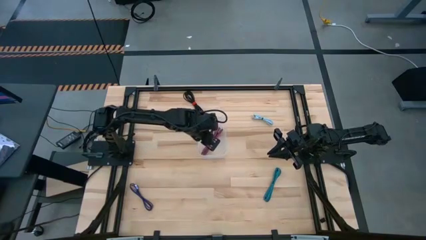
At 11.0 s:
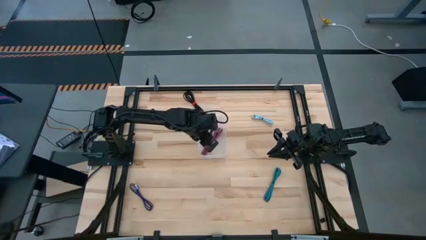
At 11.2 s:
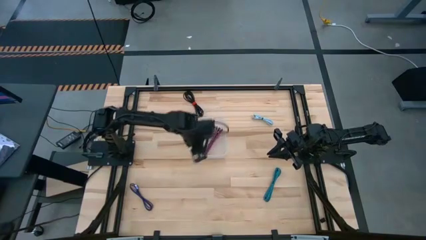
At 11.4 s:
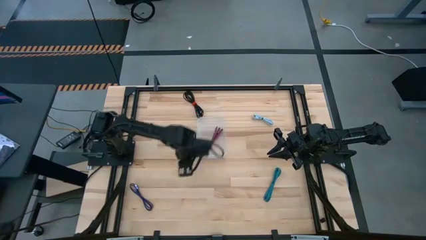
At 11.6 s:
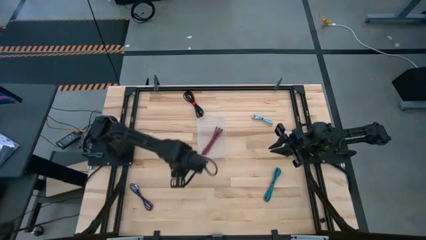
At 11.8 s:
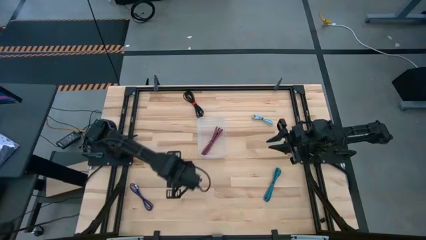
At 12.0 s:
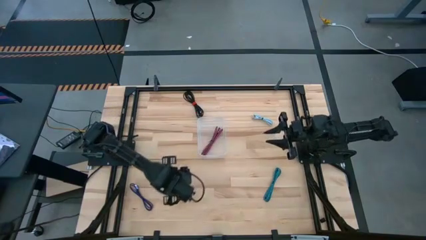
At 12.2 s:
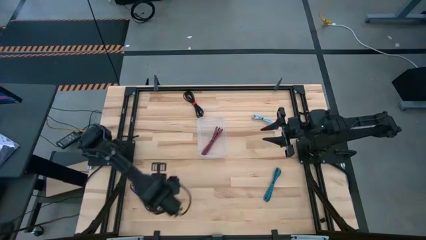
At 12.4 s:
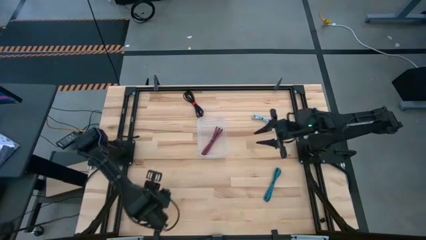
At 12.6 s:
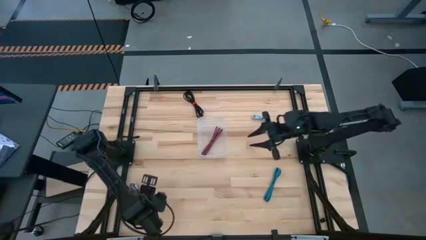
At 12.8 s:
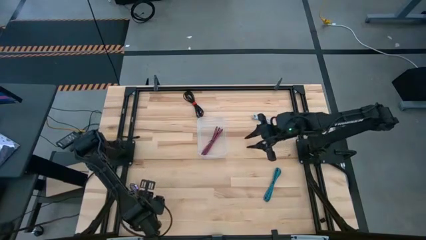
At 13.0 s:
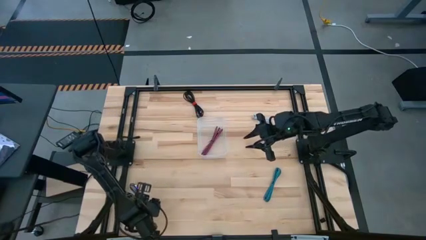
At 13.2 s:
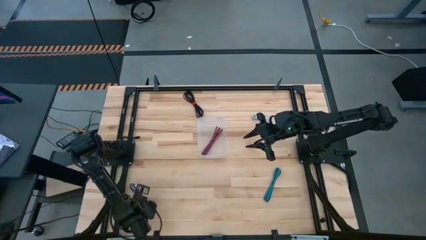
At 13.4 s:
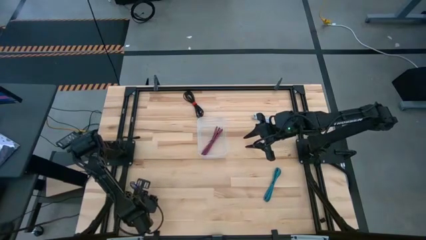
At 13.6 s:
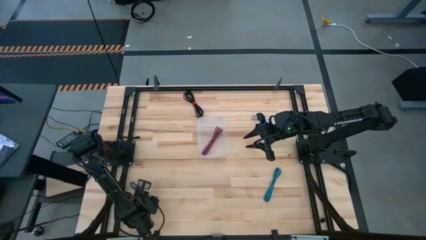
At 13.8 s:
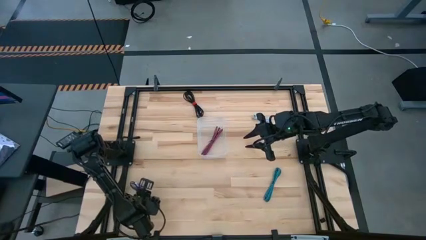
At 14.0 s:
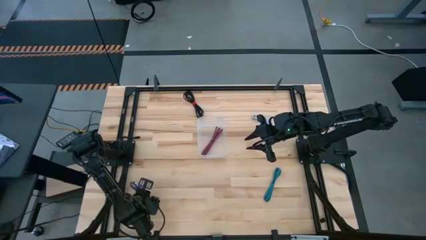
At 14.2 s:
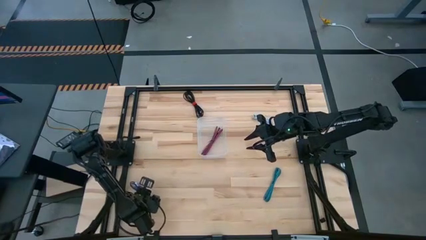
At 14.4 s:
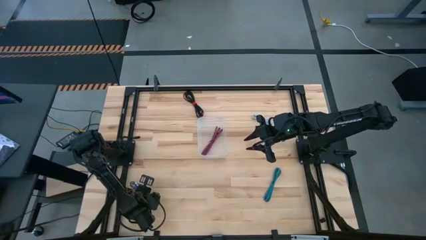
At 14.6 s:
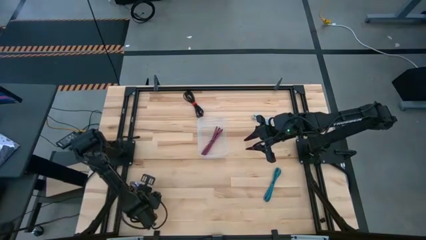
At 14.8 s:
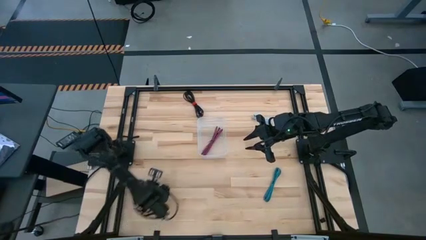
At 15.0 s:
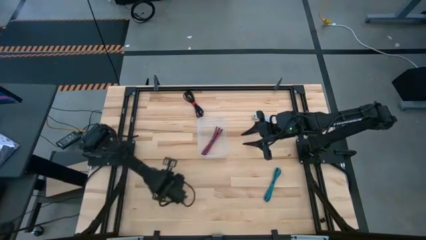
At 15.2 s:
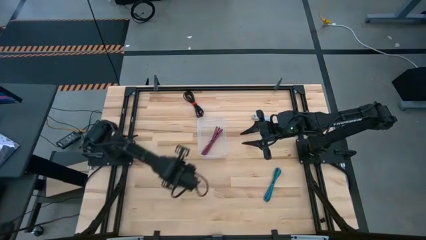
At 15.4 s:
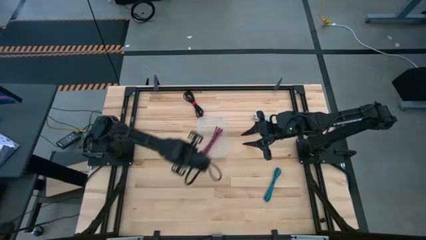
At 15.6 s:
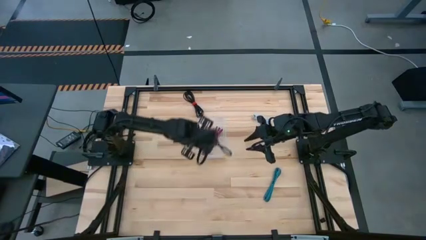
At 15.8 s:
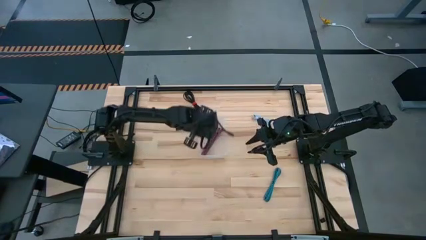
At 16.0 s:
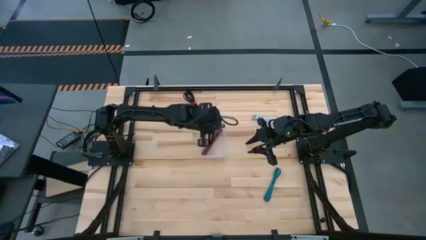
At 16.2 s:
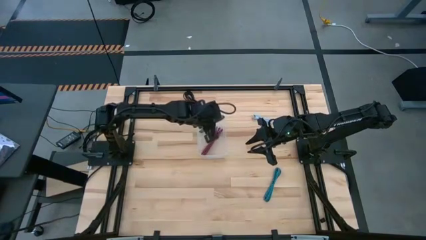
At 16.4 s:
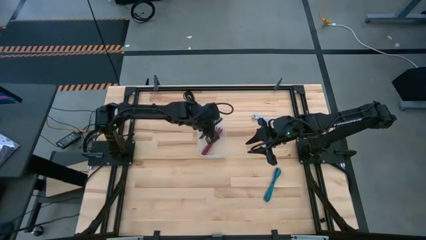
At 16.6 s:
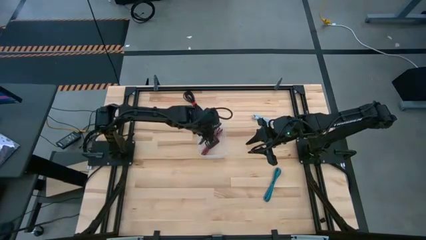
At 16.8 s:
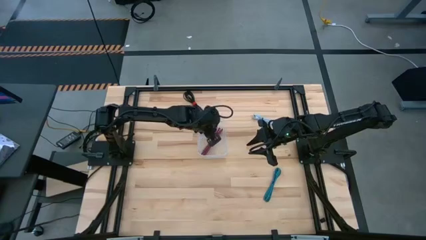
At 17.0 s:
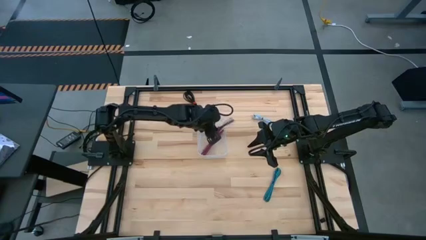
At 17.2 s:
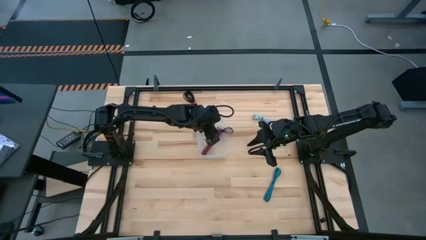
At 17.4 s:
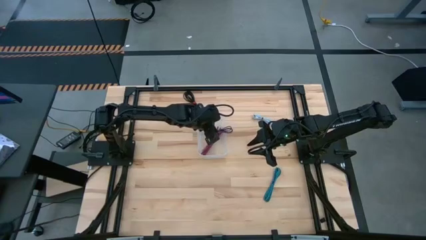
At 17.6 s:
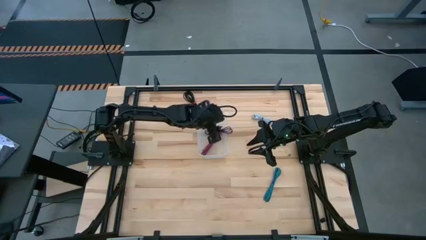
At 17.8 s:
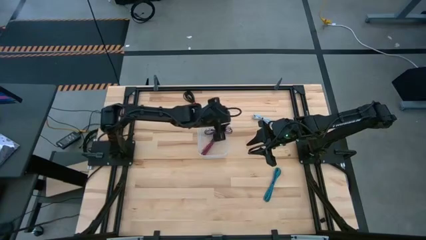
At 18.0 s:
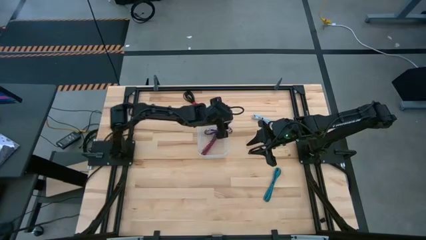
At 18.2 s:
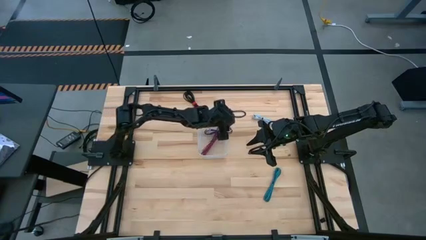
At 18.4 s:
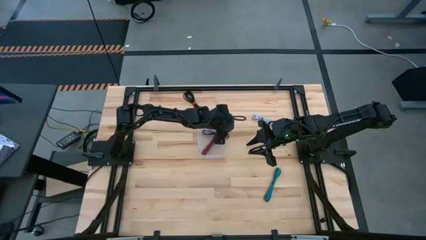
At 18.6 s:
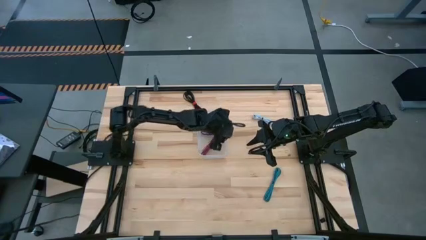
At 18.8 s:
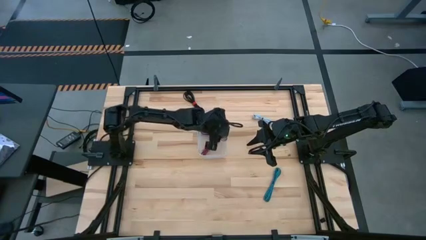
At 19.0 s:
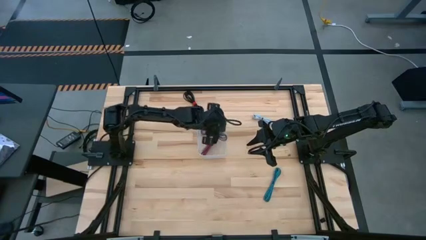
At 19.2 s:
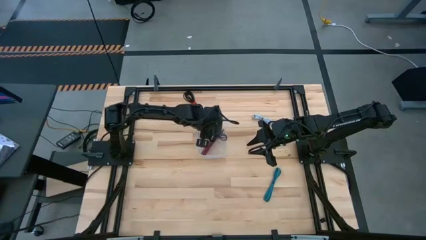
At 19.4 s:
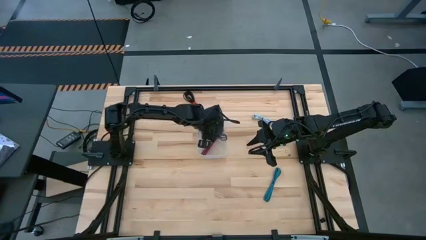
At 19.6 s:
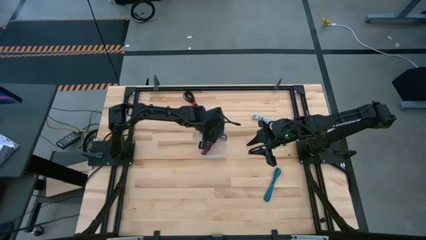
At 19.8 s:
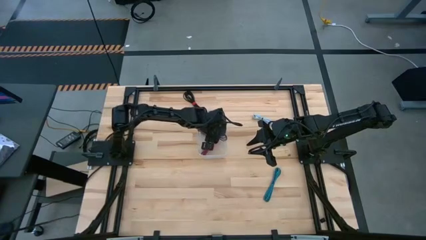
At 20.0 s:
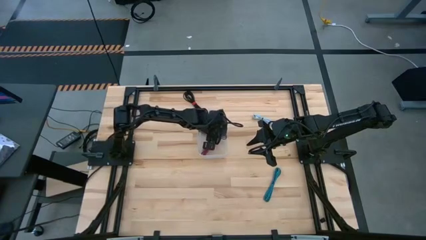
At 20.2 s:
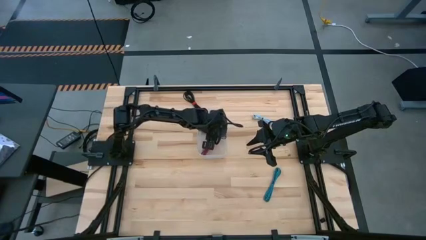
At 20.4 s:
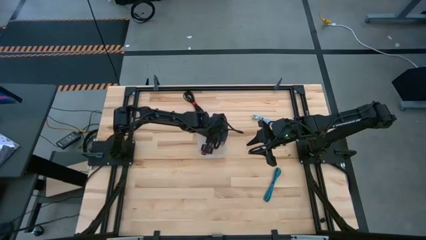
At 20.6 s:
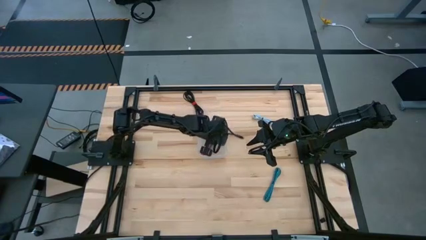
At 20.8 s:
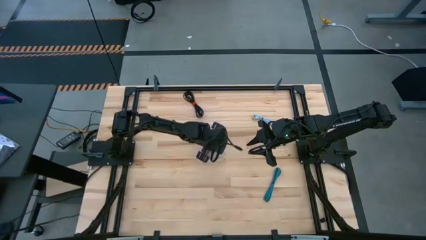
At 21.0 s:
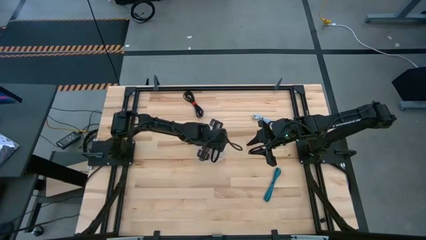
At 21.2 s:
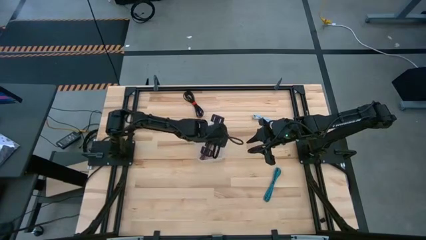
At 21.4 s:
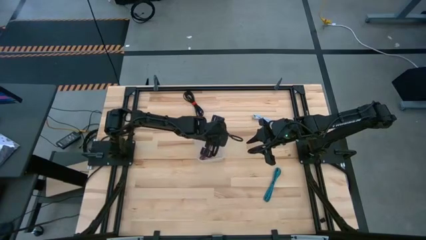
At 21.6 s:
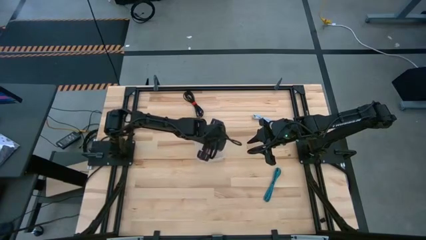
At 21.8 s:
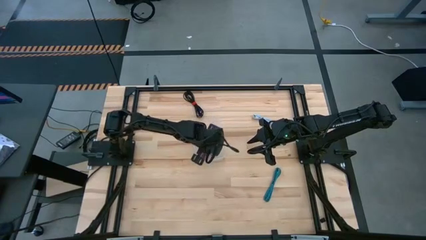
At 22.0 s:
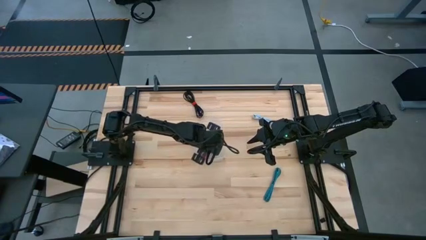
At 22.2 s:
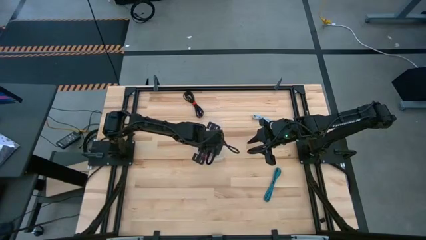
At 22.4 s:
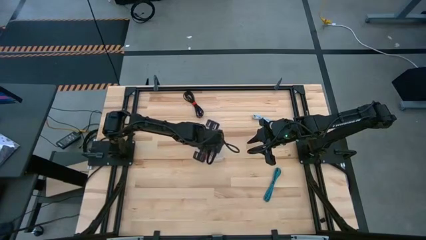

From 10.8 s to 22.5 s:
Task: Pick and place USB-C Cables
Put the purple charger cable into the white bin

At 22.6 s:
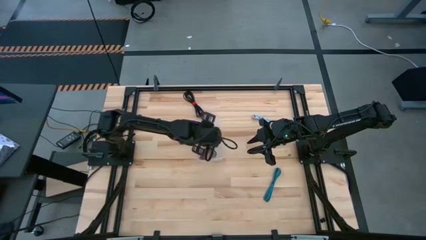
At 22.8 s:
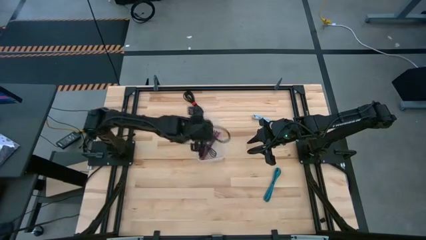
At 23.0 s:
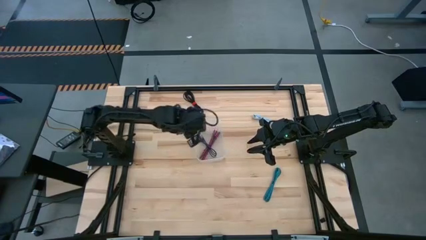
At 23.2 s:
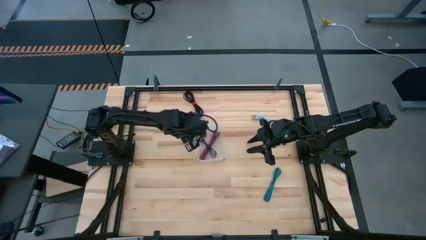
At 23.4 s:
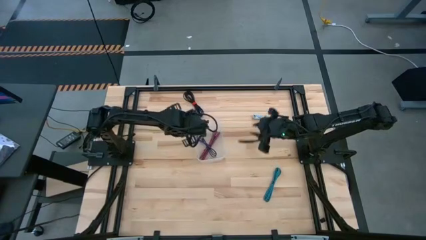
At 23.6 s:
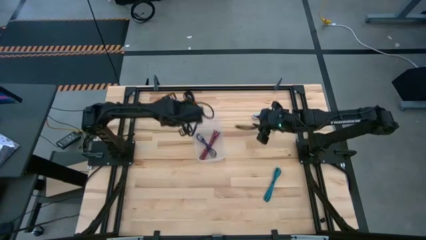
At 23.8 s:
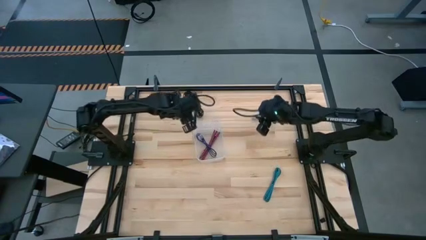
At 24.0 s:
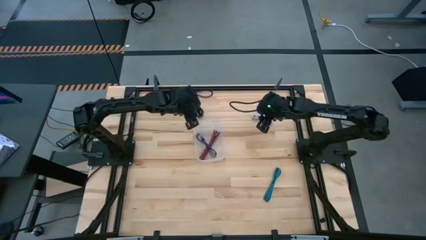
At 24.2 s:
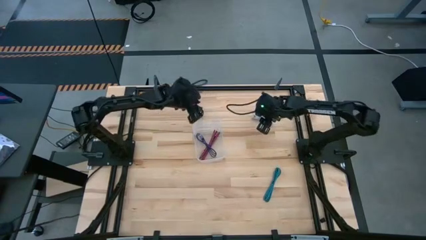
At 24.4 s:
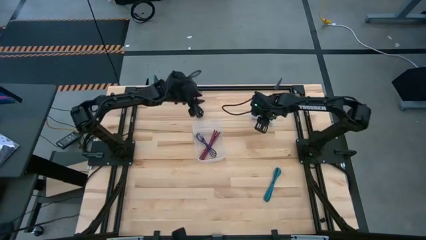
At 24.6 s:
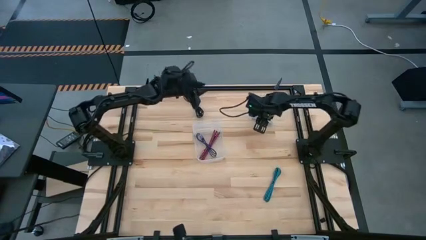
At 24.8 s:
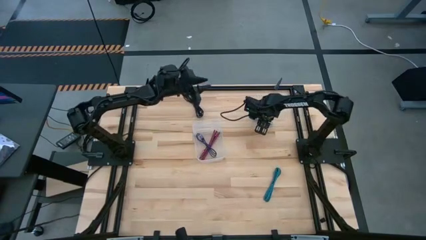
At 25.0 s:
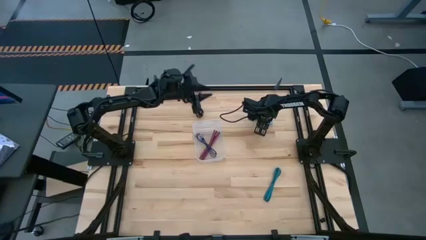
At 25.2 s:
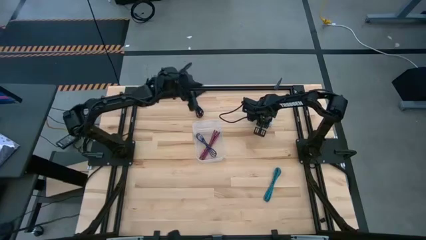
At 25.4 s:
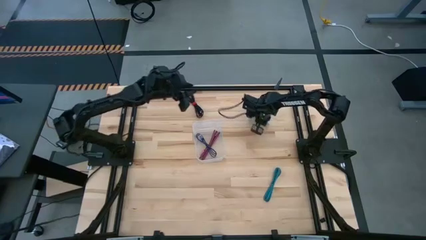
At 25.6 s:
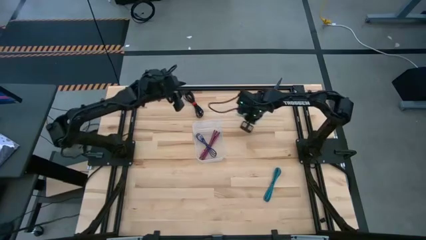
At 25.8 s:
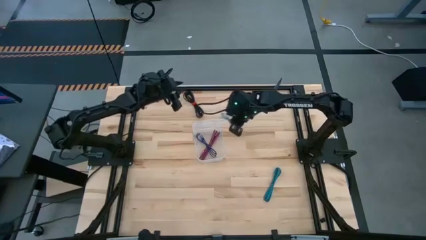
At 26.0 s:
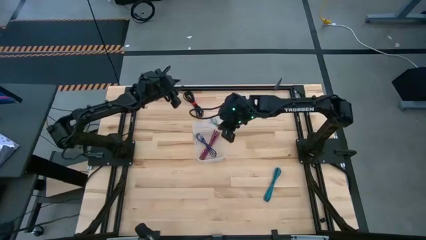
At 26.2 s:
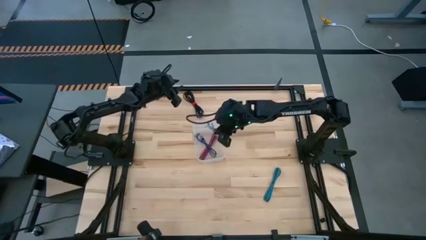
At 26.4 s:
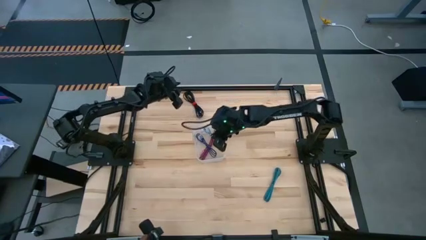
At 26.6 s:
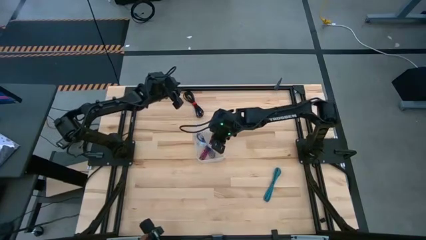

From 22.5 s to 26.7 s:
Put the light blue charger cable into the white bin
